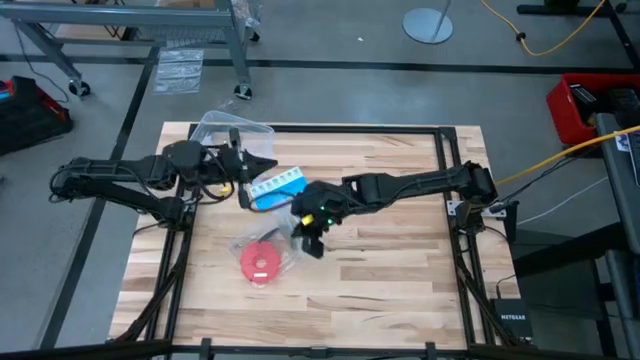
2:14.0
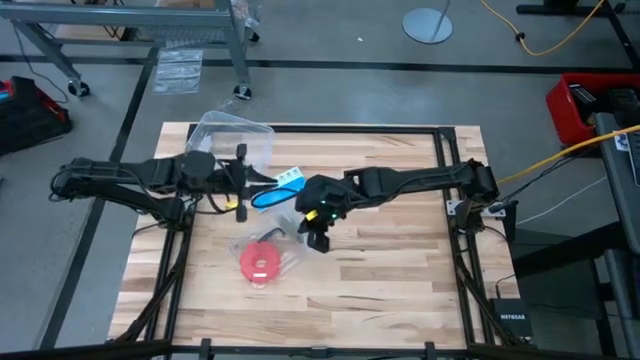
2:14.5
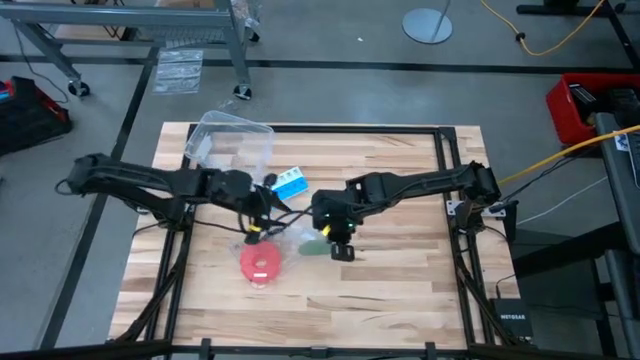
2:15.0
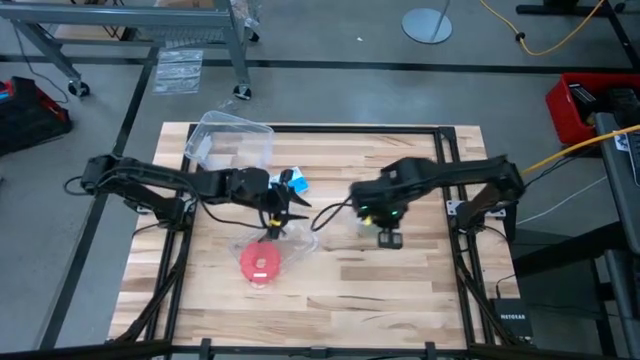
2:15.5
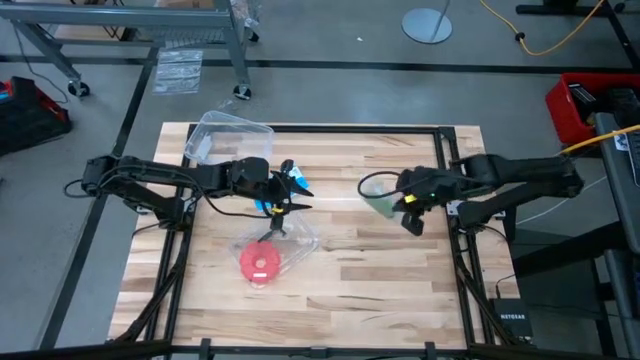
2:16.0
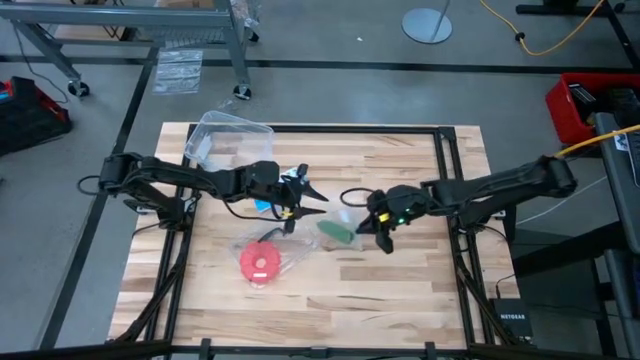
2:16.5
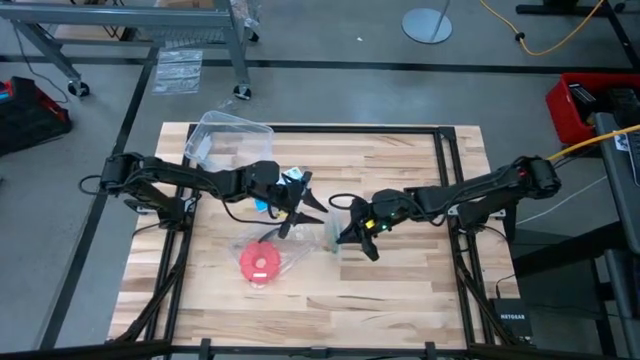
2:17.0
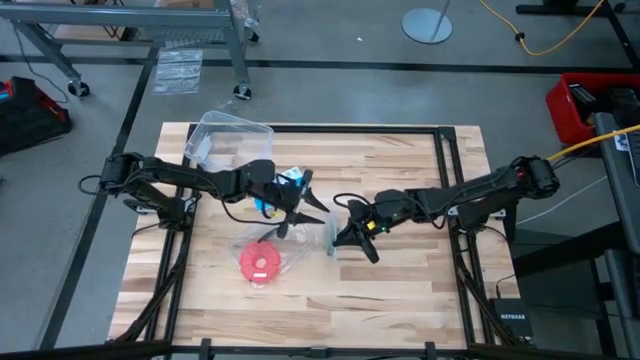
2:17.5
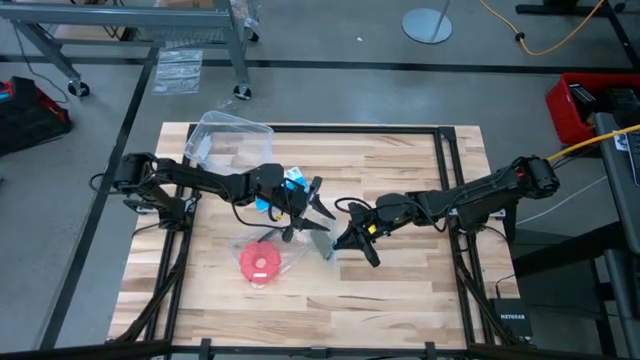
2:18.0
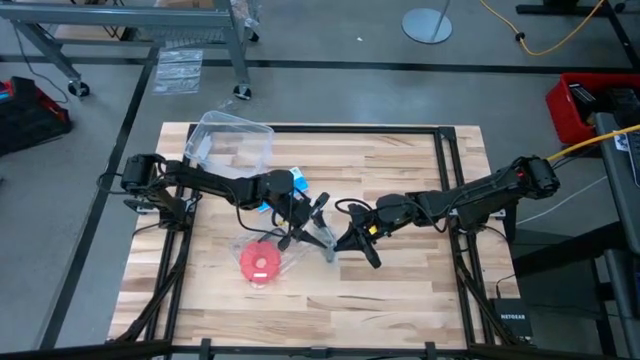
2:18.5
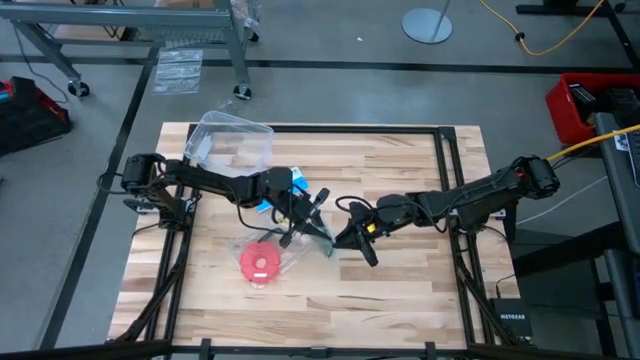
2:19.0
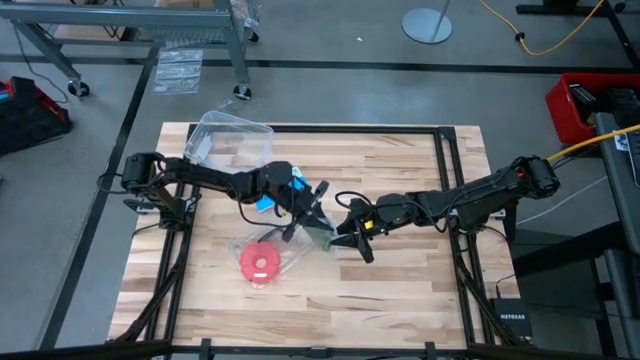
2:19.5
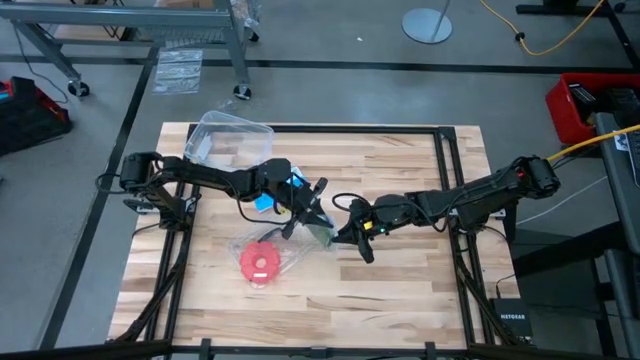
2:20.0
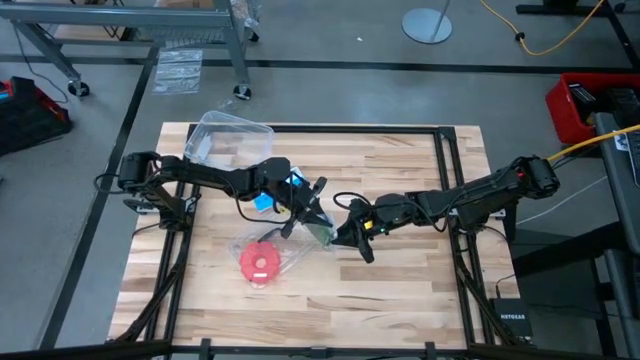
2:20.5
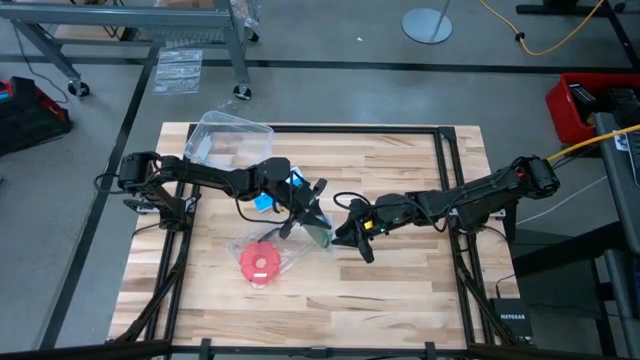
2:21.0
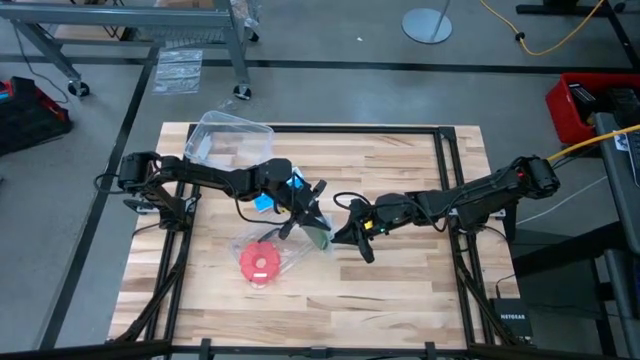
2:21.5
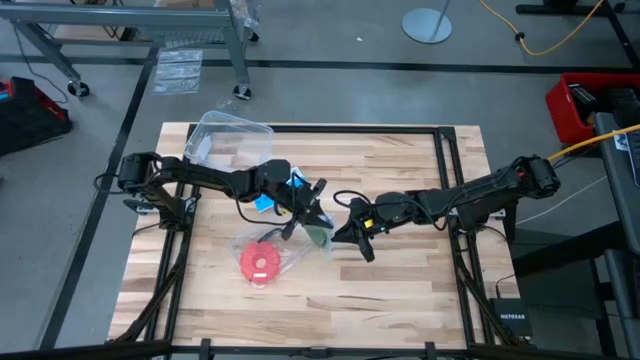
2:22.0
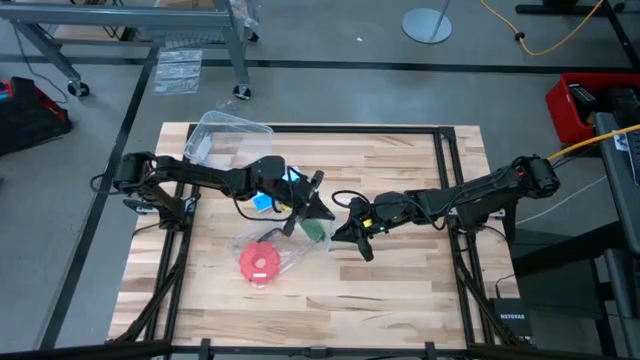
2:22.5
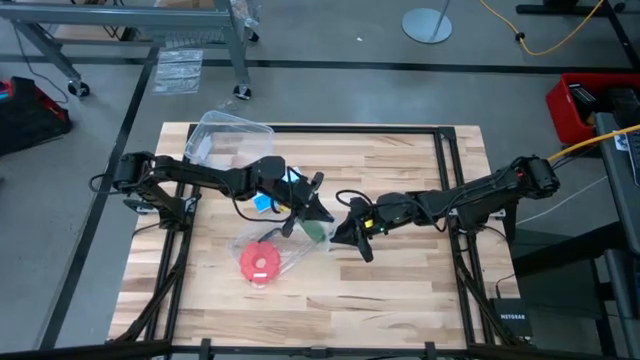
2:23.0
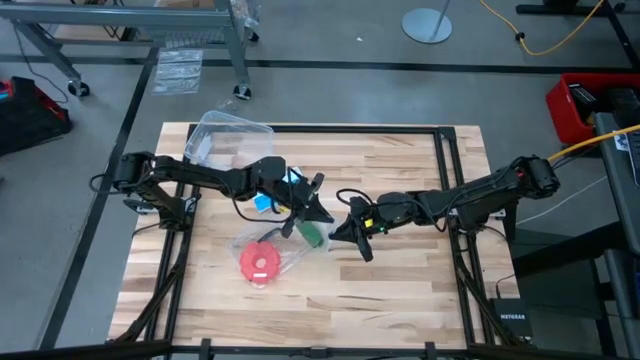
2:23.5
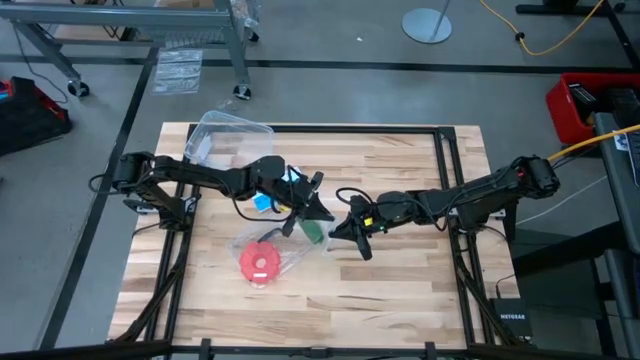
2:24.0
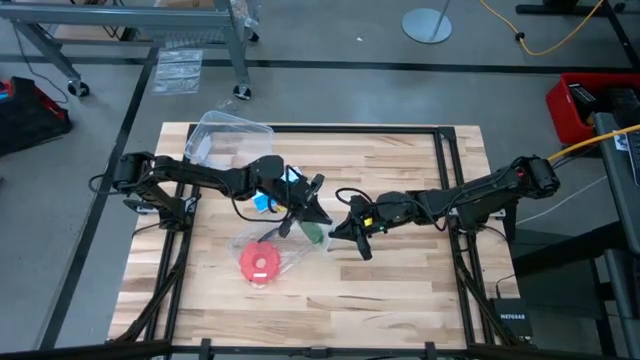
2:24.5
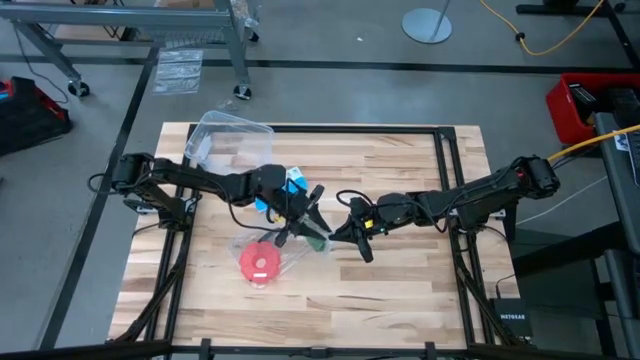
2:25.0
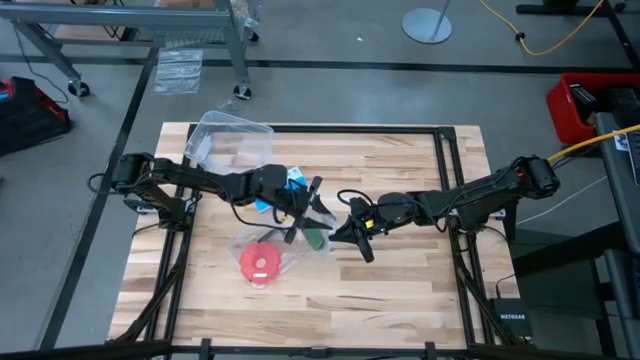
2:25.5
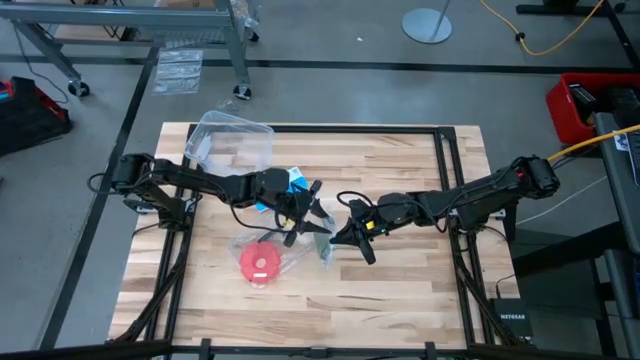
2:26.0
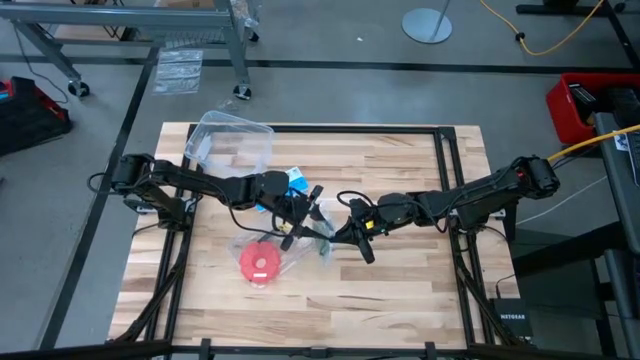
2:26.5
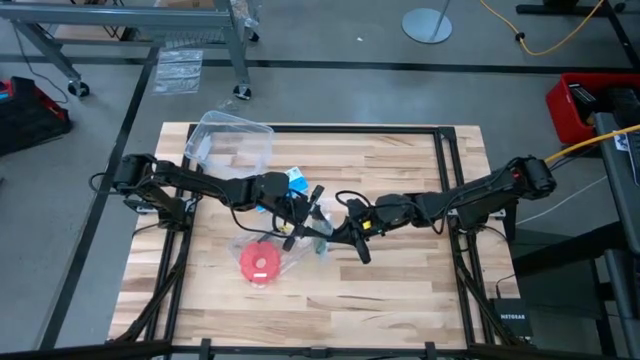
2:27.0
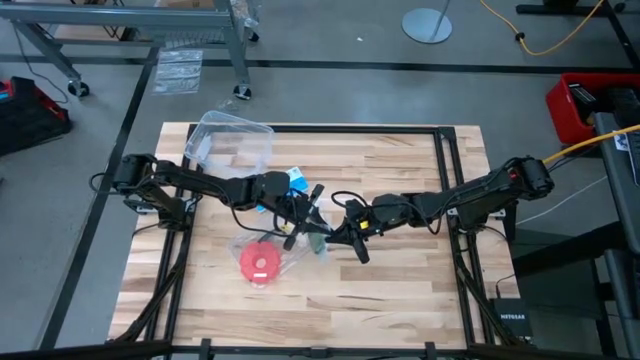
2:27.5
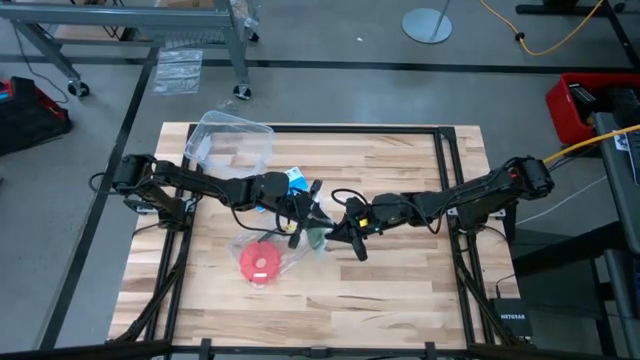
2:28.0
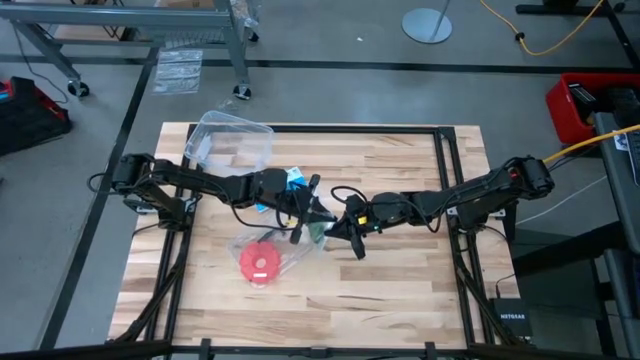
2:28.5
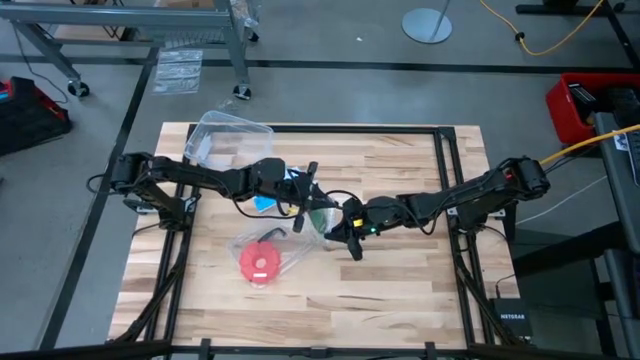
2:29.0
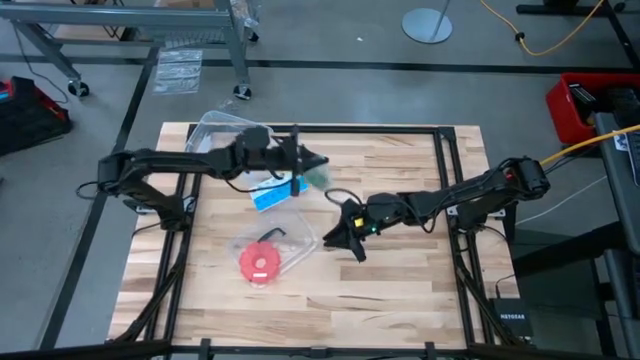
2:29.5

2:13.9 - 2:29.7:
Task: Roll bandage
Close the transparent zip bag

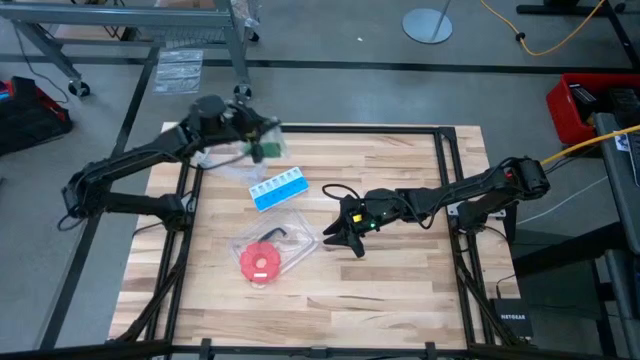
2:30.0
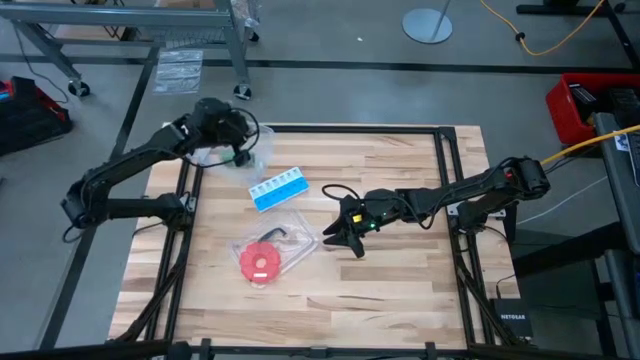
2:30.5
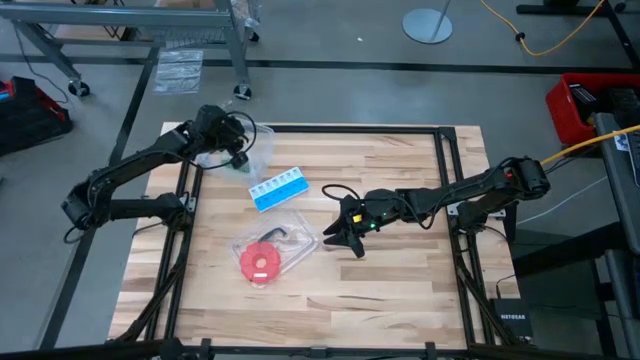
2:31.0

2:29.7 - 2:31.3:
Put the transparent zip bag into the transparent container

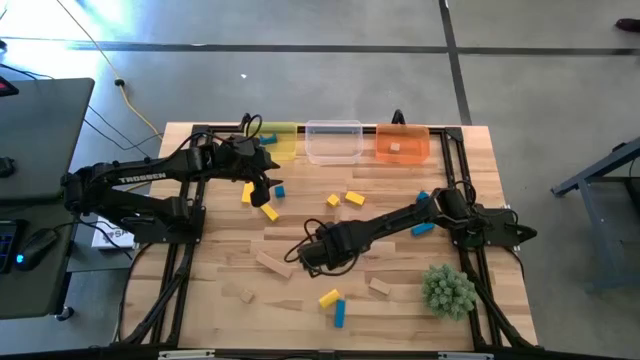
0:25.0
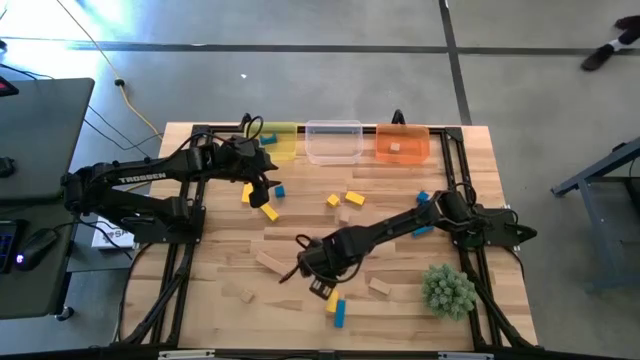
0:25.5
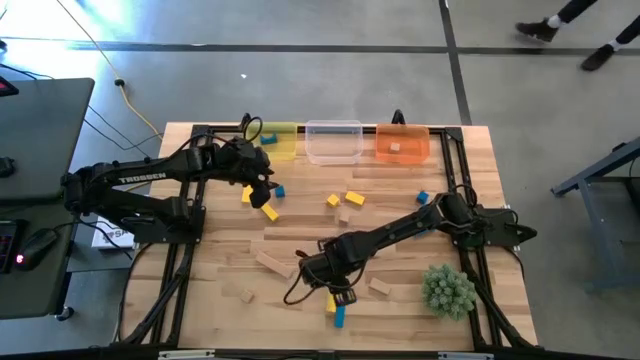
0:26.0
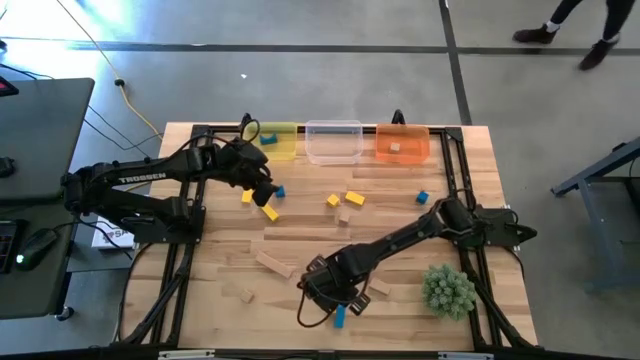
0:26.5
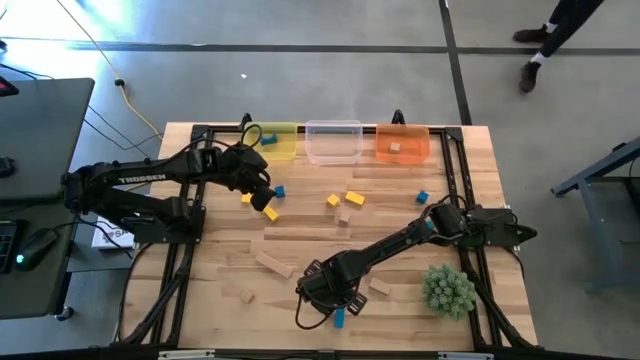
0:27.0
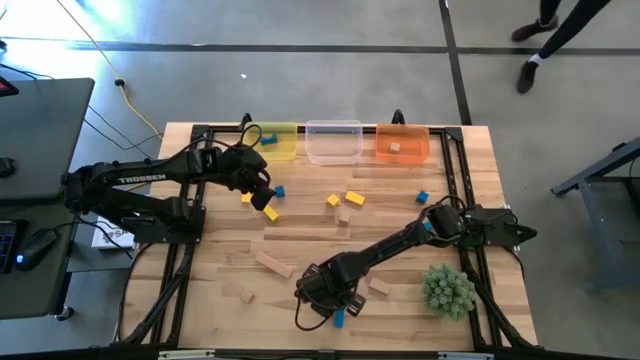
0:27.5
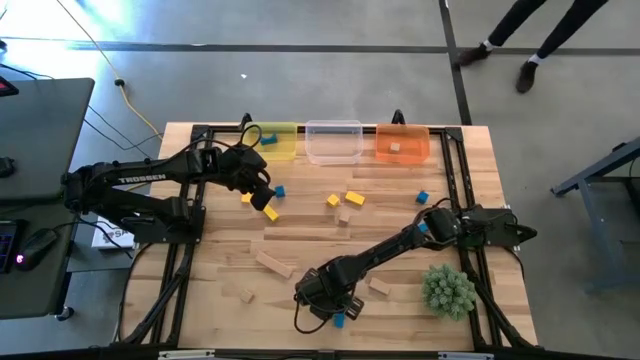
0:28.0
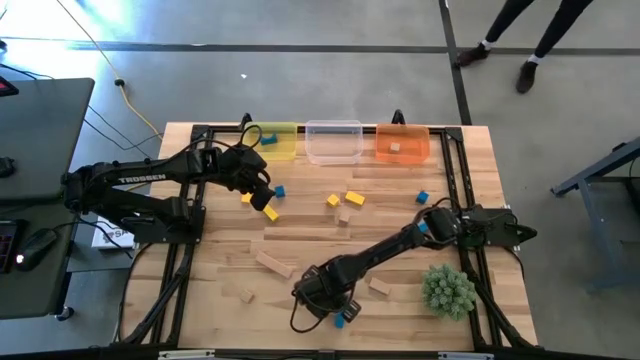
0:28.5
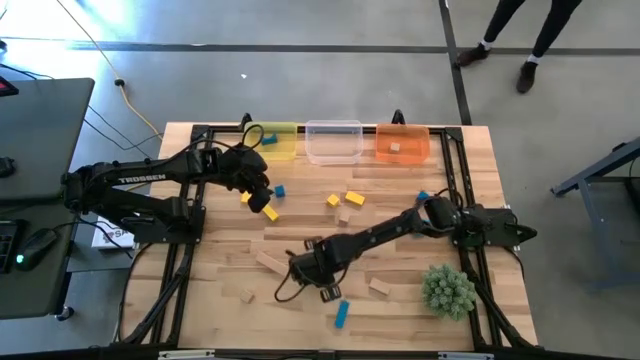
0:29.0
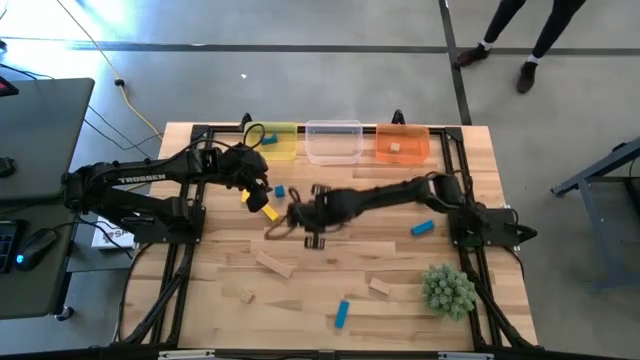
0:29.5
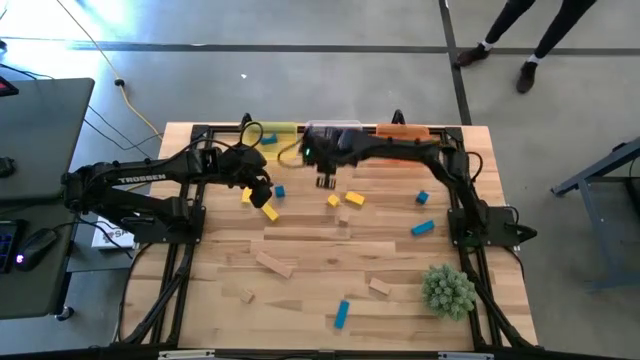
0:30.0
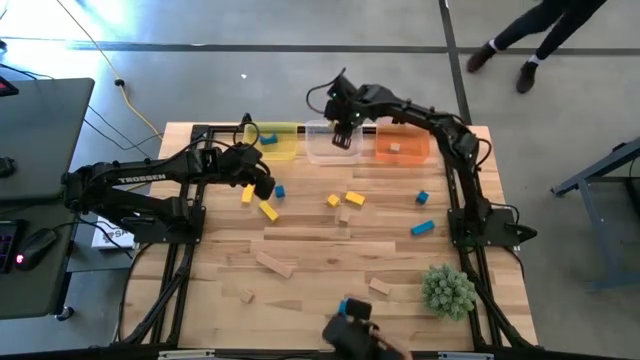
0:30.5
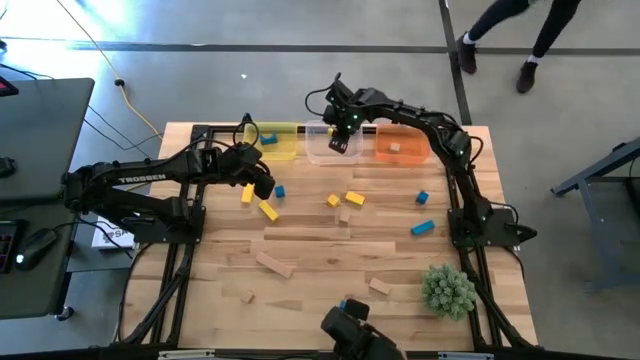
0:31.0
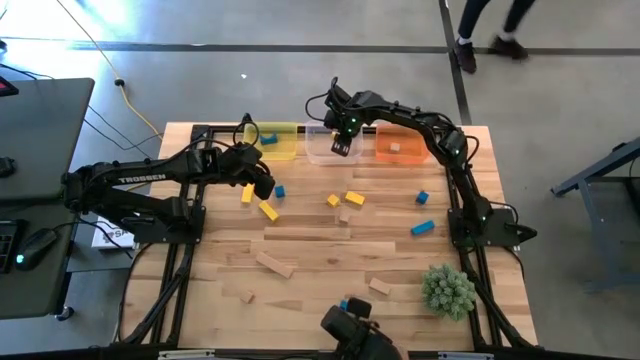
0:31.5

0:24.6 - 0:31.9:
Task: Sort & place blocks by color
Put the yellow block into the transparent bin
